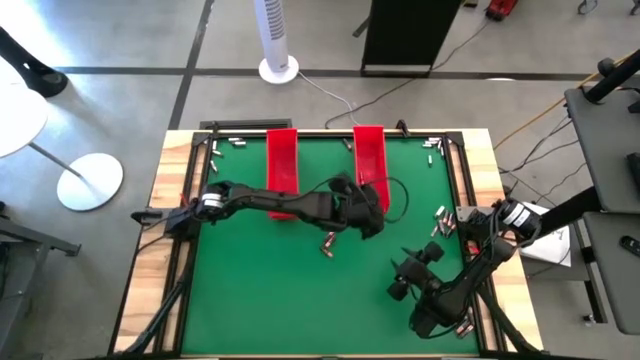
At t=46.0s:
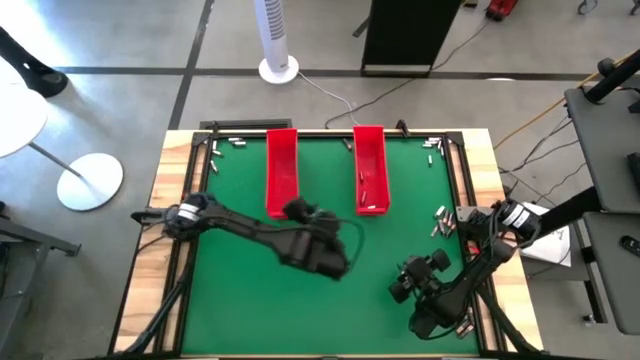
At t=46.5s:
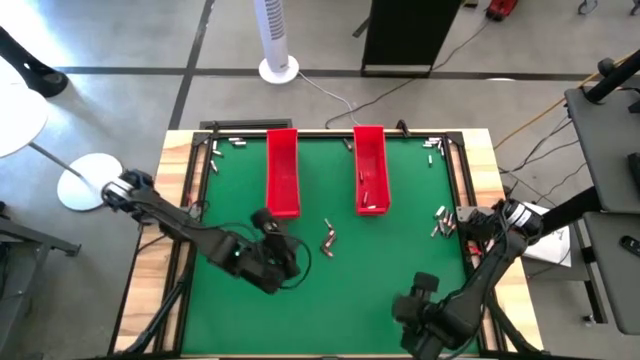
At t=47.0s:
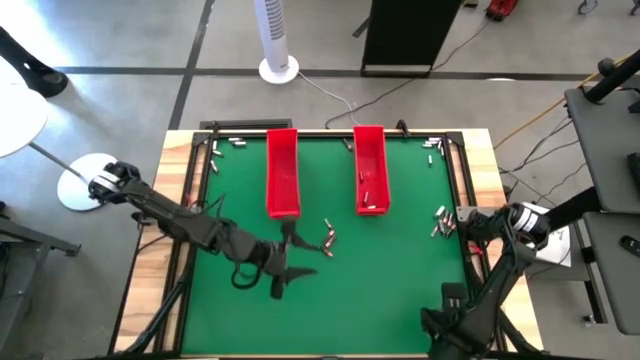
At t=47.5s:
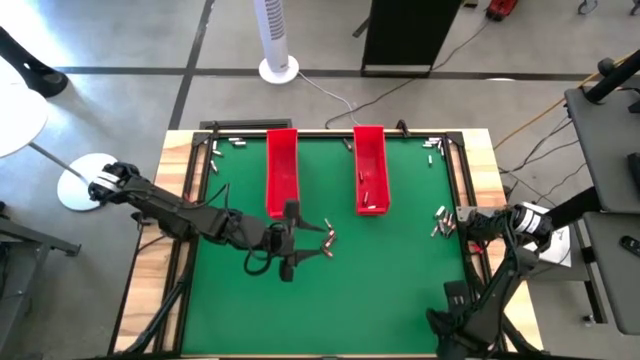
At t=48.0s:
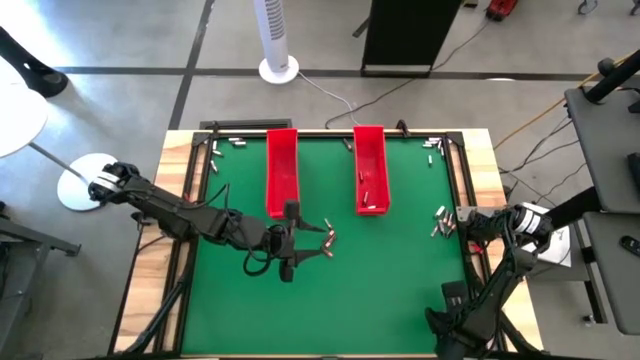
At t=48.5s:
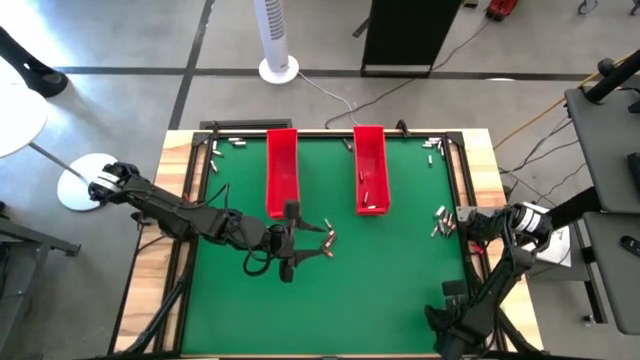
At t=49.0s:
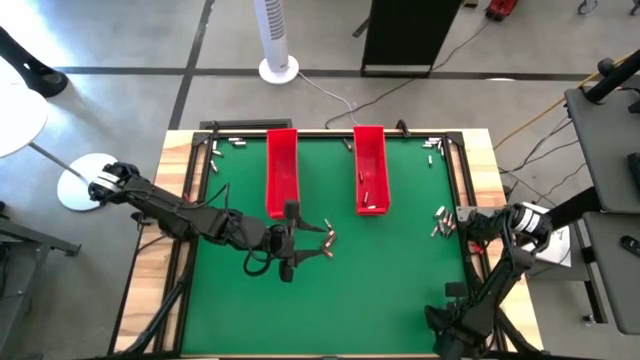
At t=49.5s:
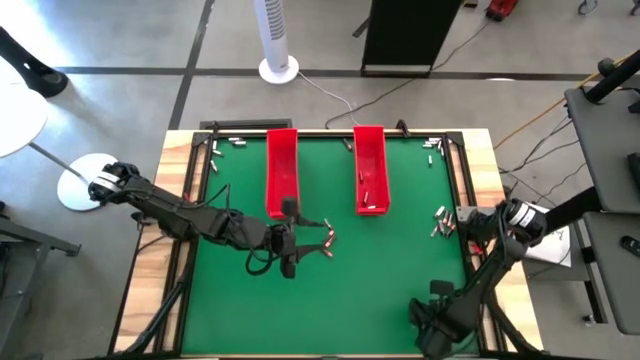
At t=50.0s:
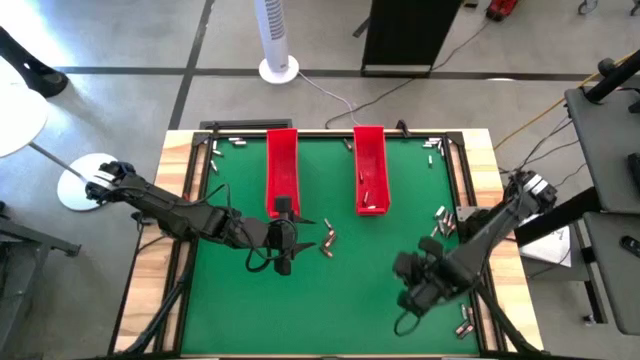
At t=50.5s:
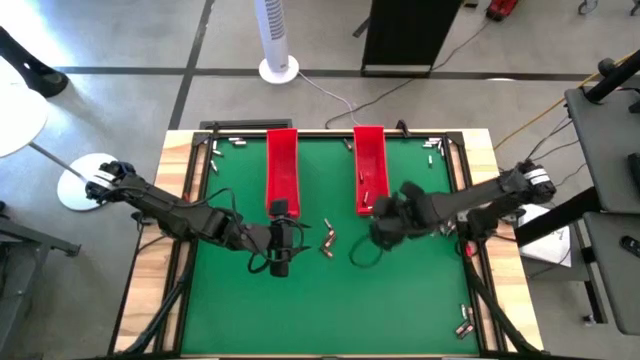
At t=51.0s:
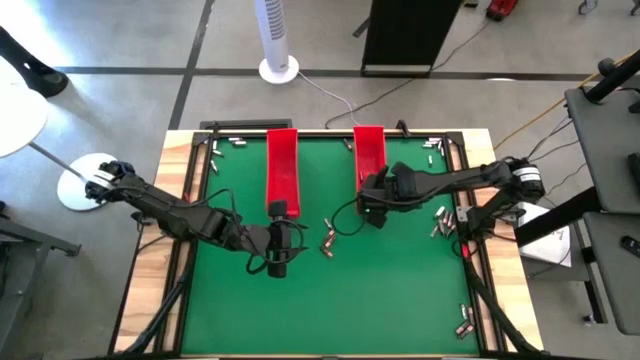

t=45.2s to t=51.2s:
Task: Sort batteries
Put the silver battery into the right red bin

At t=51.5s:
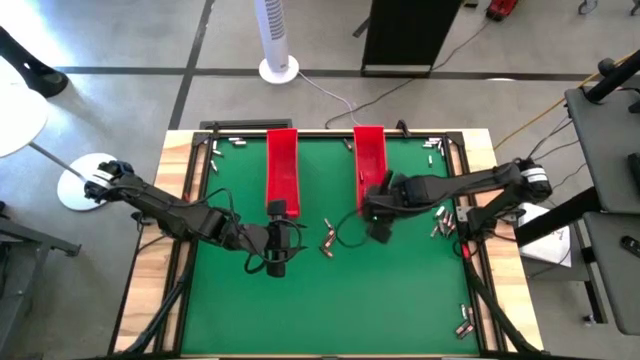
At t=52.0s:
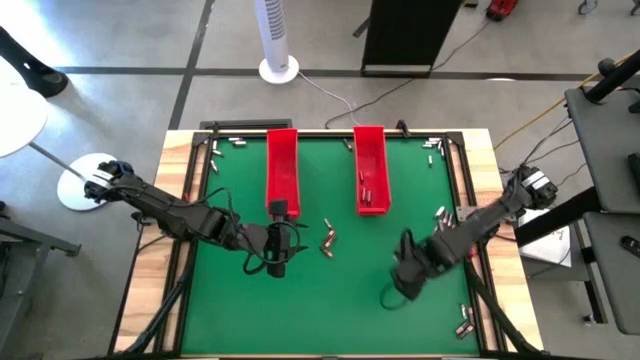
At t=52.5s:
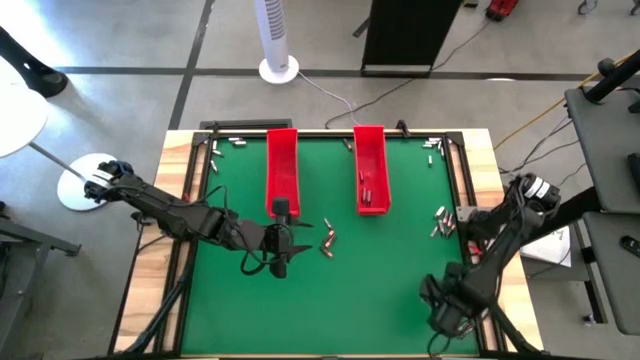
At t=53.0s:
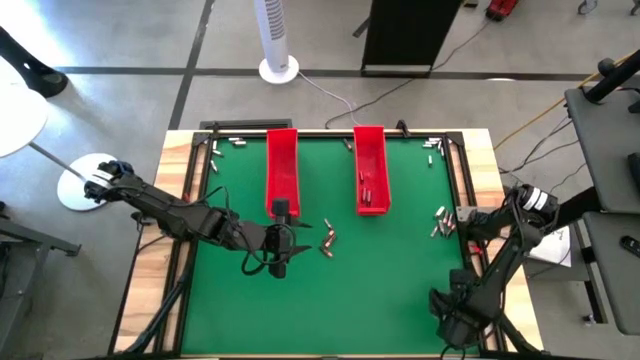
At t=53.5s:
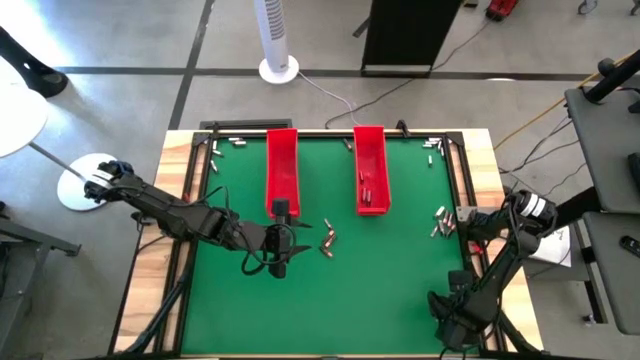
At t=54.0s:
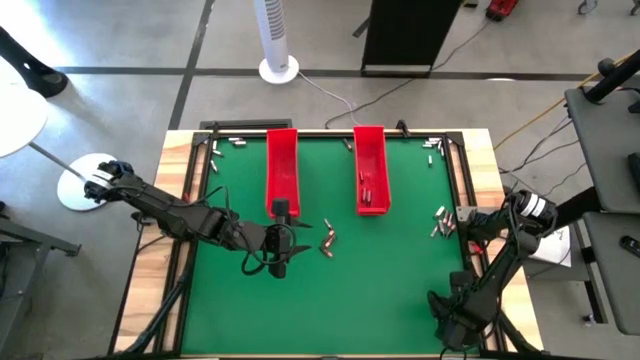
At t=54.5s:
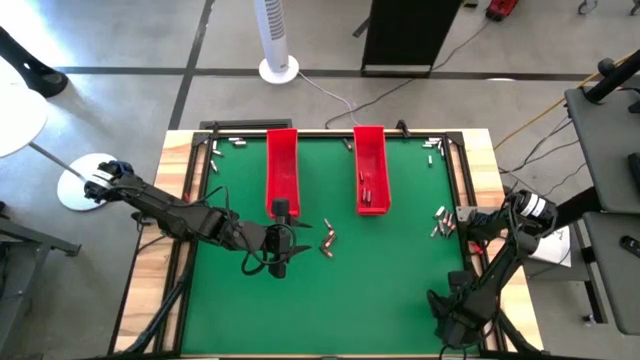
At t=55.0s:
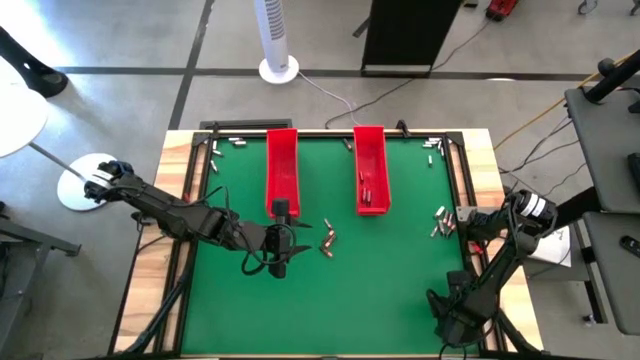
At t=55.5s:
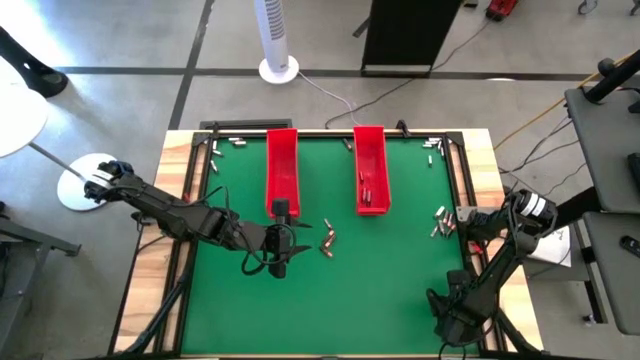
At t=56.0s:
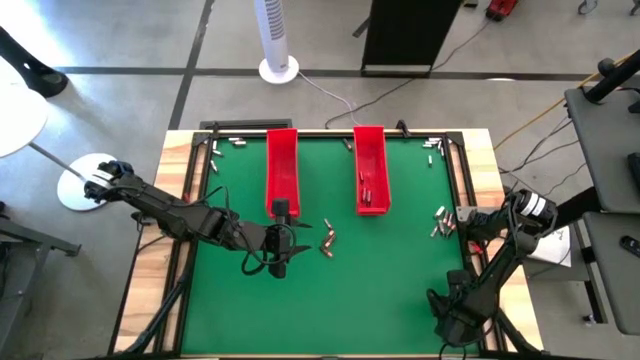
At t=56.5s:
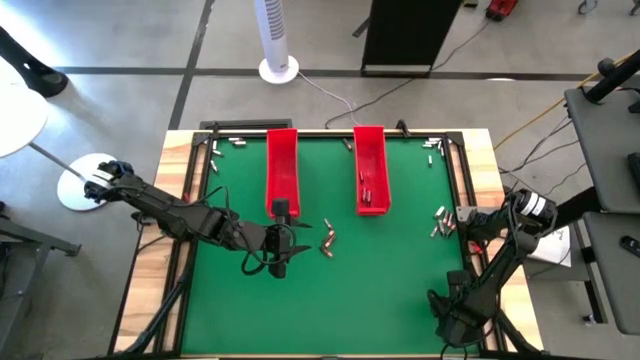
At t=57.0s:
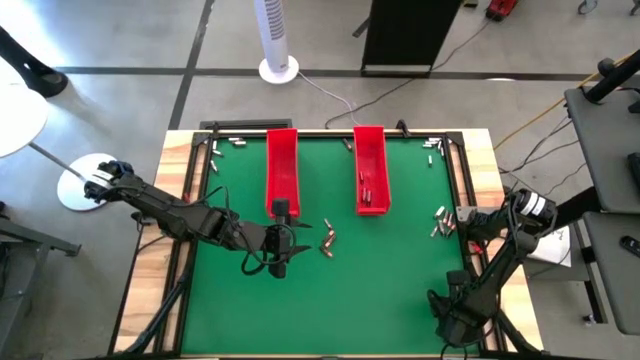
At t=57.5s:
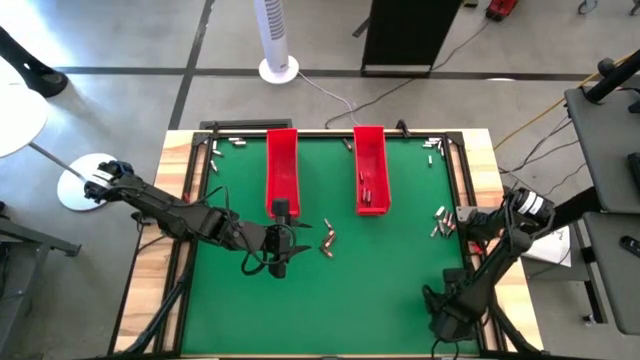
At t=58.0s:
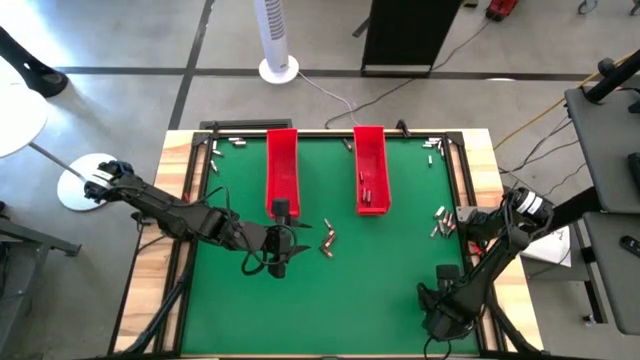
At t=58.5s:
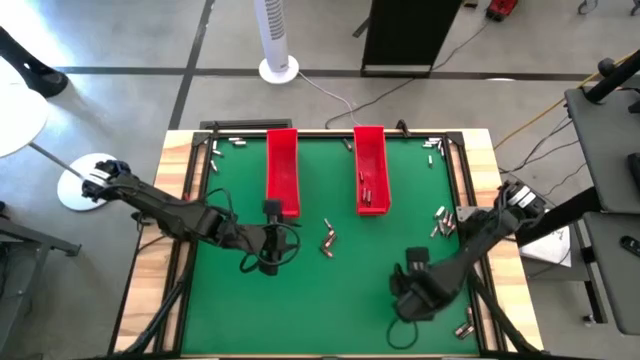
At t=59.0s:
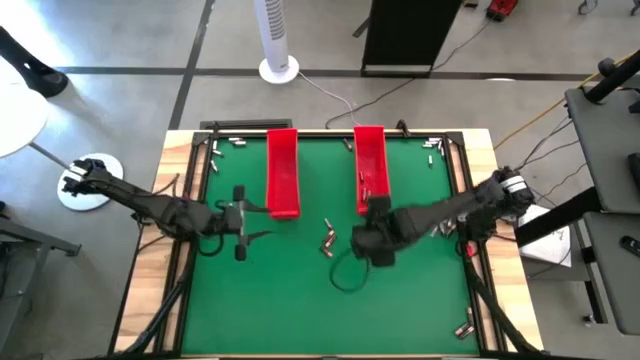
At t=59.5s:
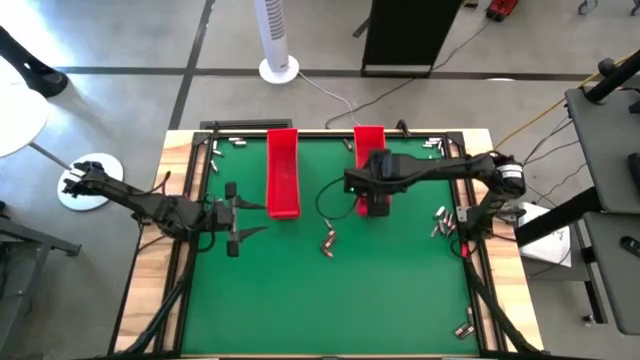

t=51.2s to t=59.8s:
Put the silver battery into the right red bin

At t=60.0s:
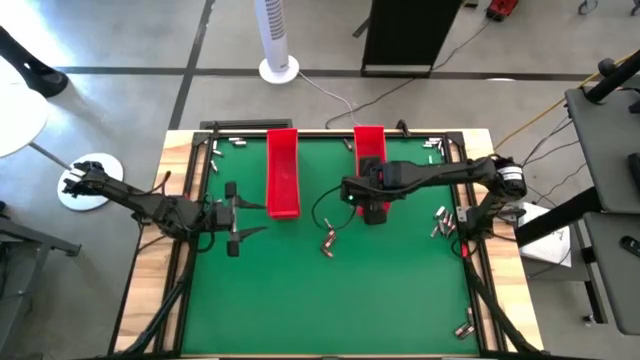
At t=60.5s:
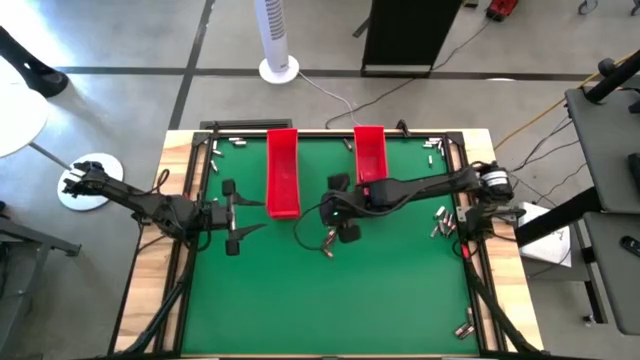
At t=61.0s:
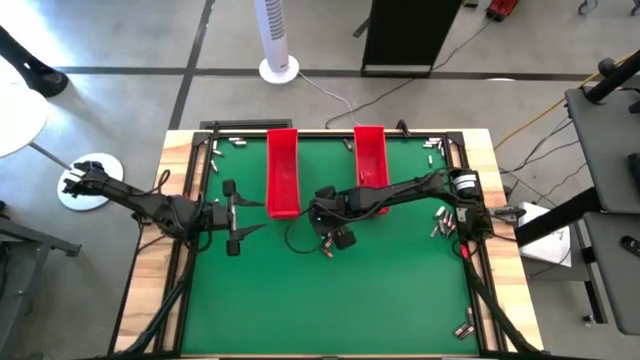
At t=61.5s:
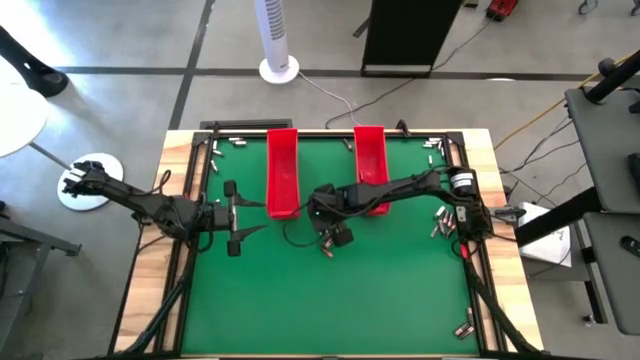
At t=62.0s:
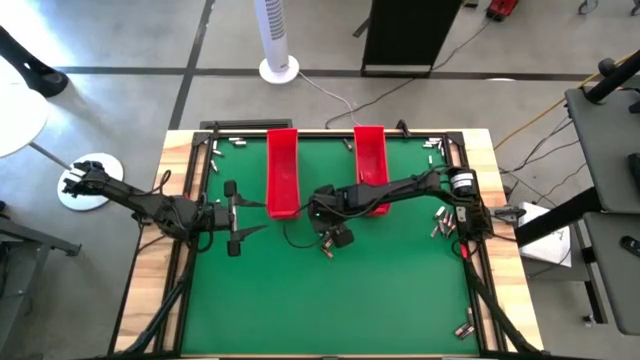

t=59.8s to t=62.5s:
Put the silver battery into the right red bin

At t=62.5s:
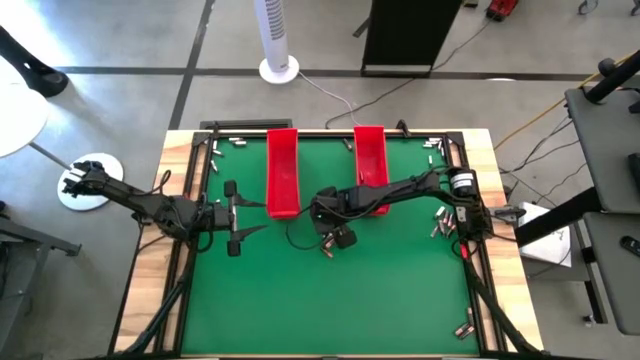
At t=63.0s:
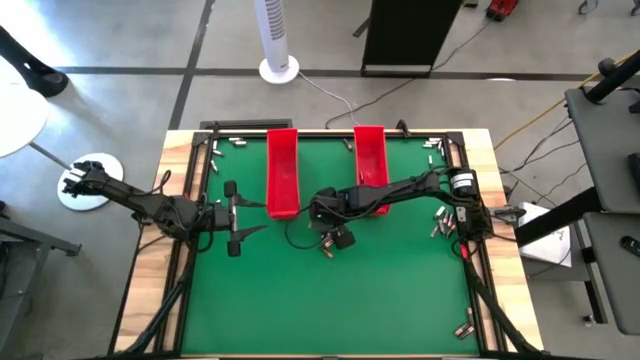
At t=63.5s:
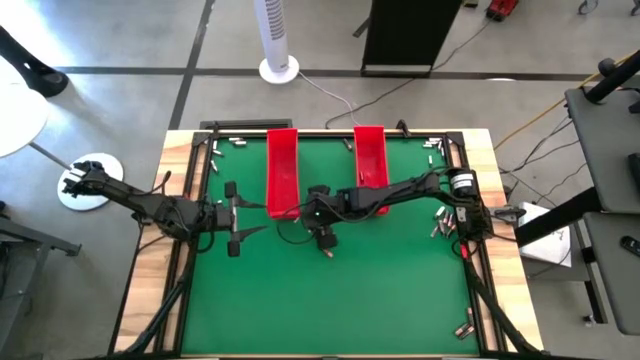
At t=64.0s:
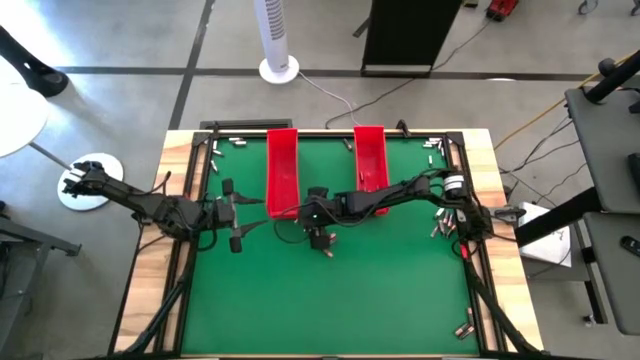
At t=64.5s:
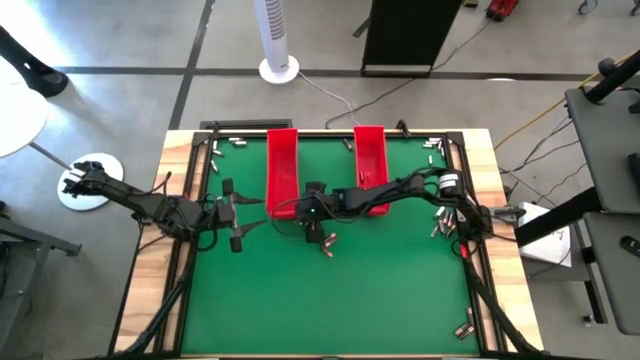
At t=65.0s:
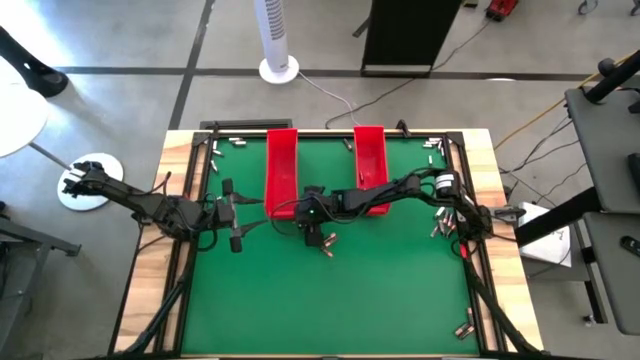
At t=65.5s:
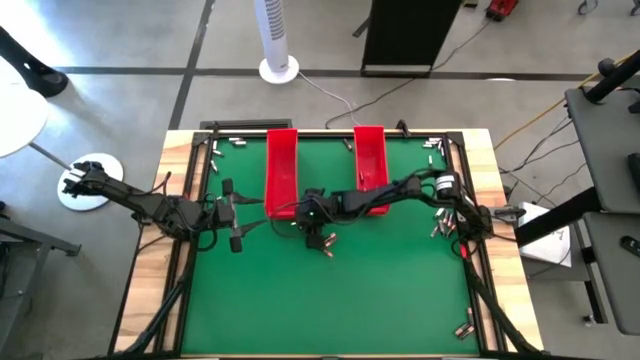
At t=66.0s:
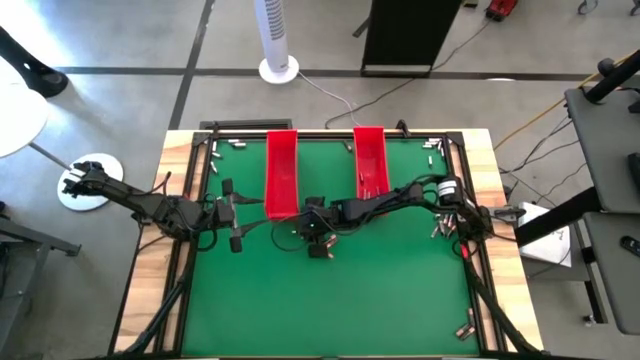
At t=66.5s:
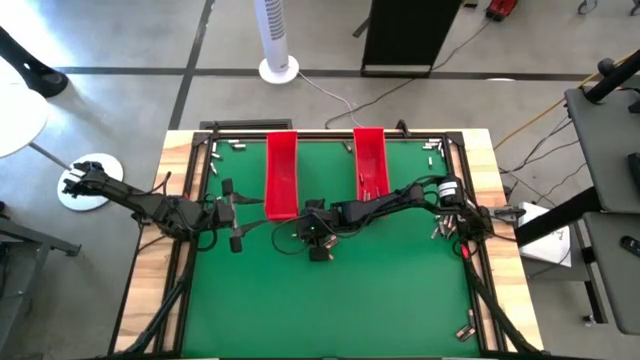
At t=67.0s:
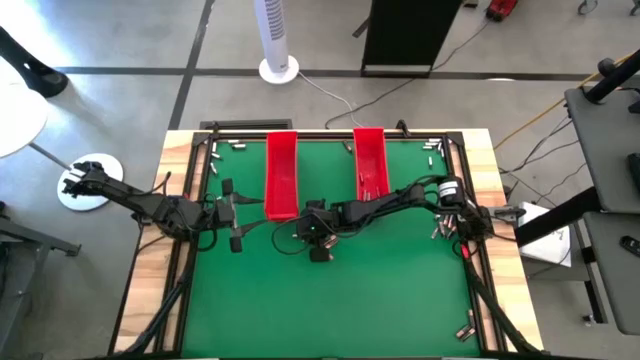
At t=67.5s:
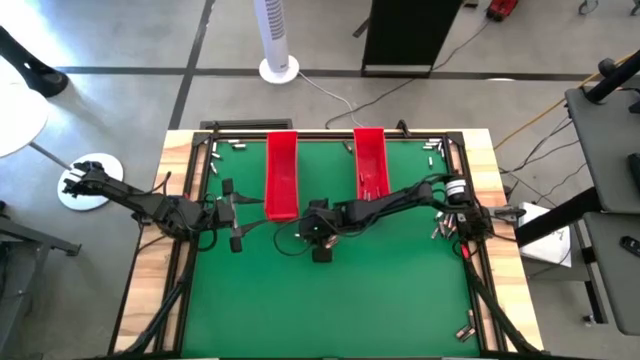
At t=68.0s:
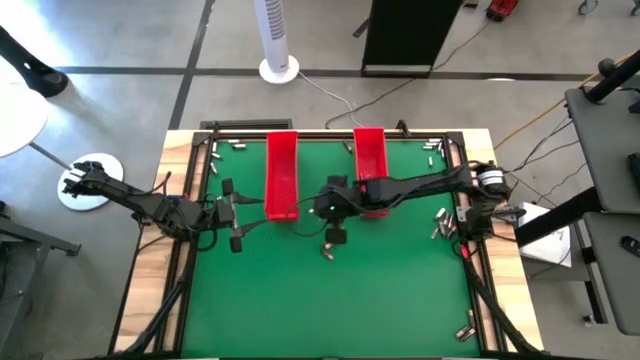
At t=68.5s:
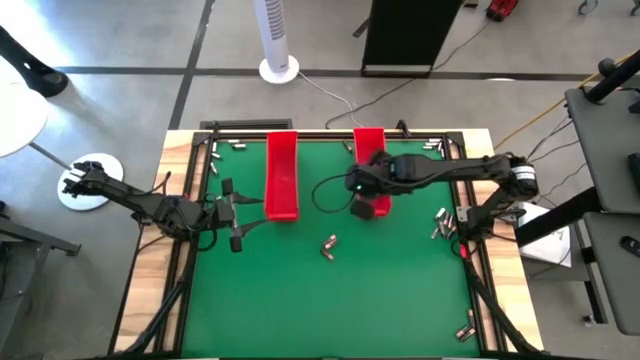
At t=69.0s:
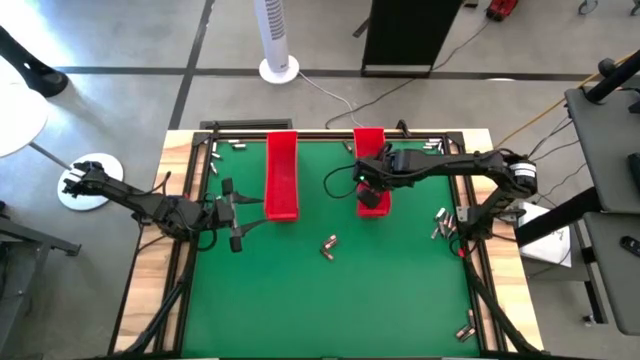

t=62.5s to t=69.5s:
Put the silver battery into the right red bin
